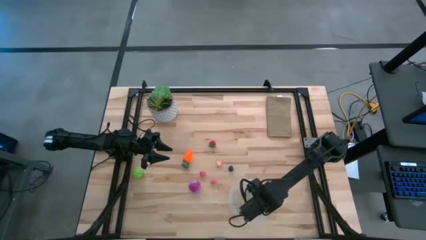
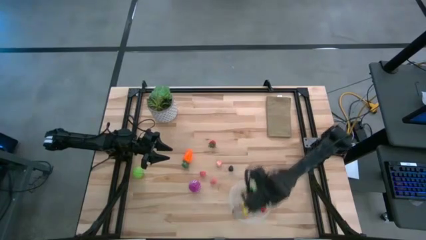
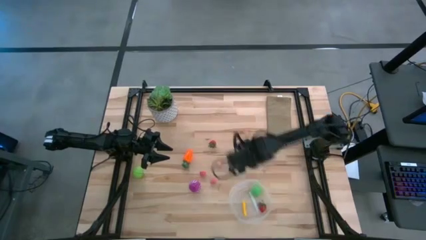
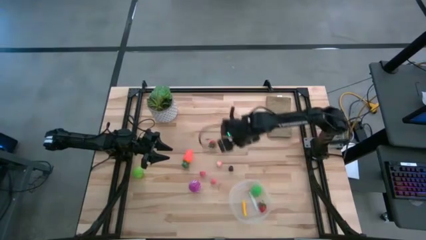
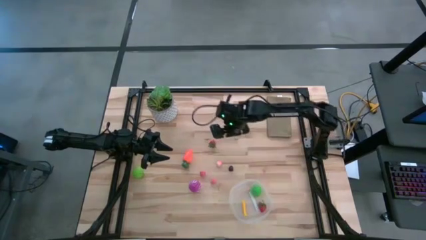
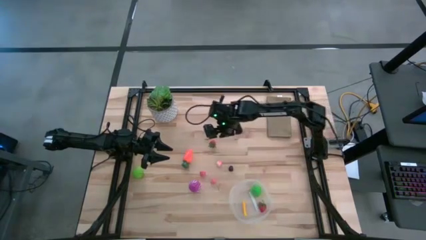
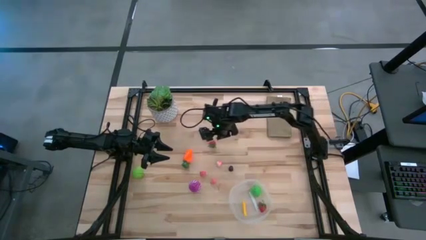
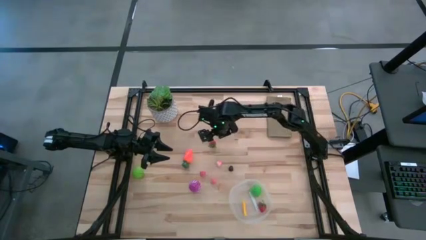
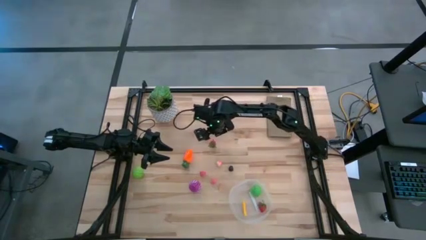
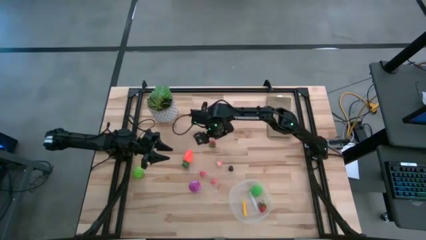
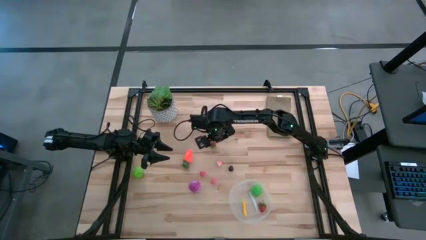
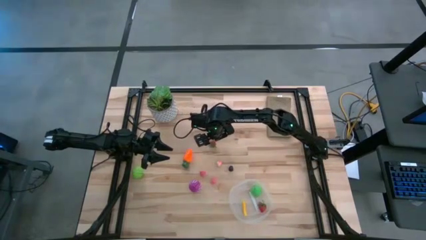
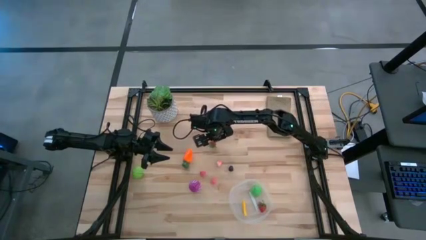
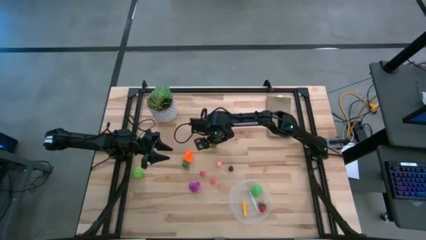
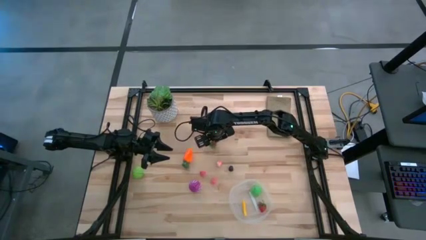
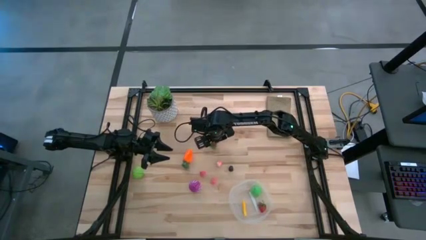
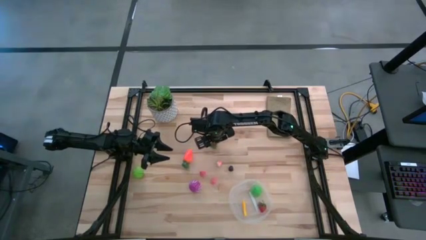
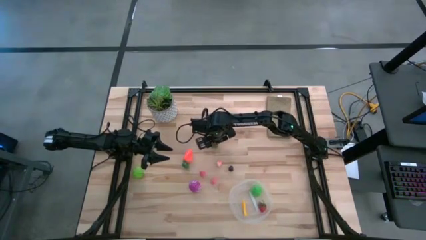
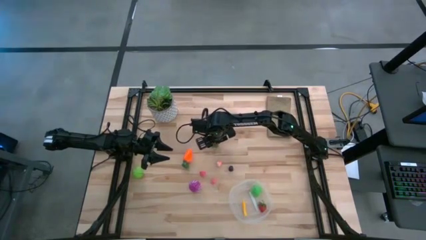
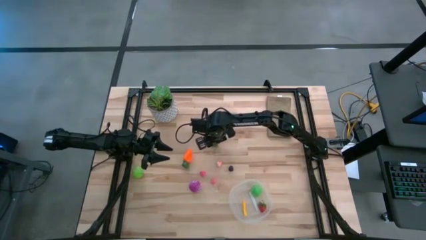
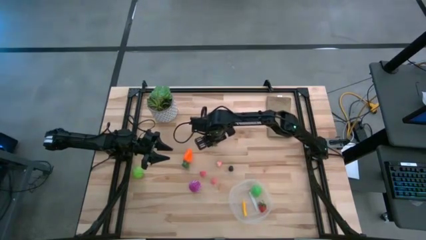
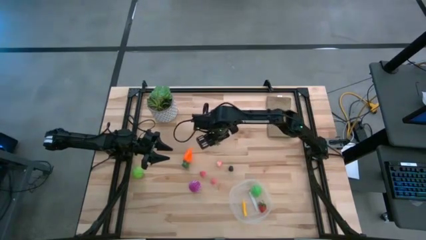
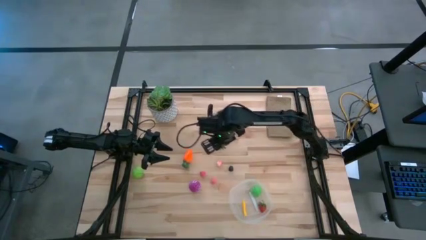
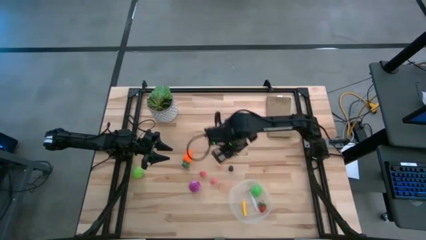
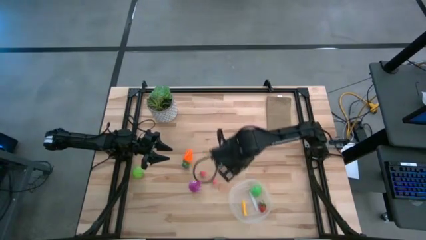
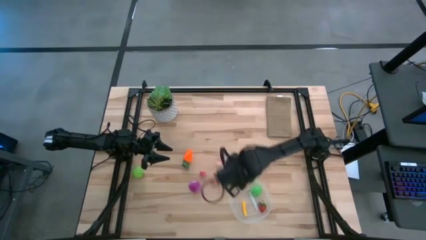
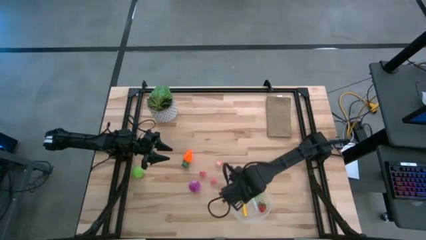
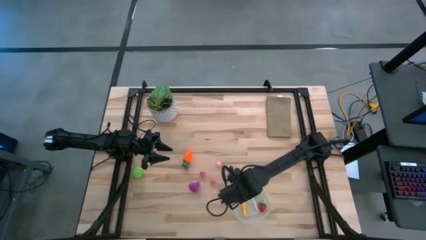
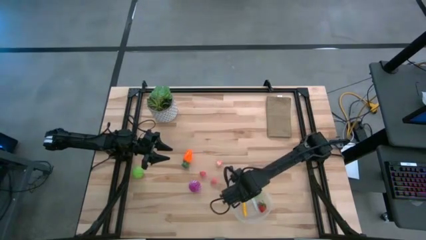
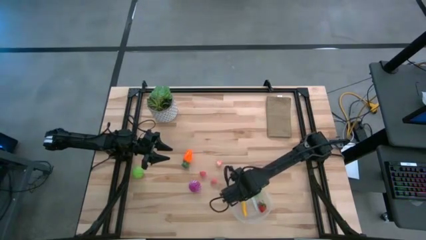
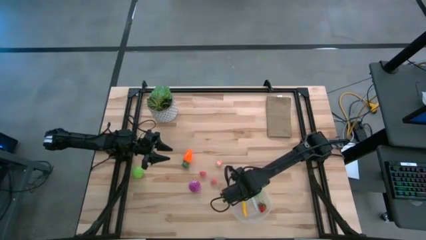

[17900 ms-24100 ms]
Task: Pick and placing Produce into tupperware
Put the strawberry into the transparent bin

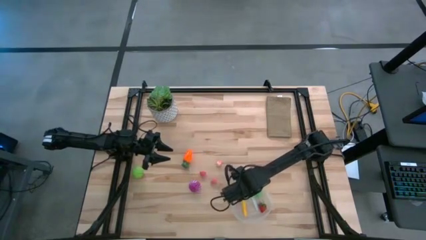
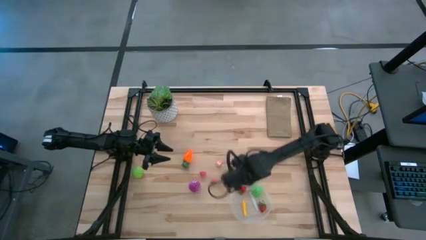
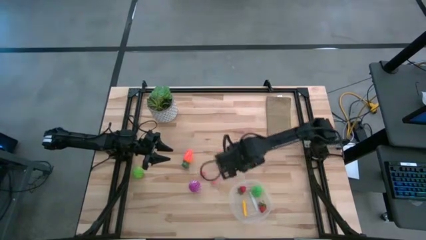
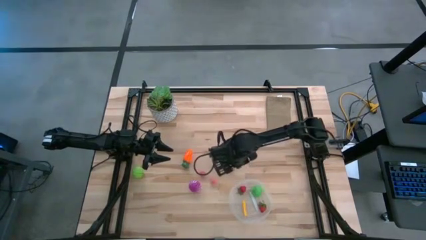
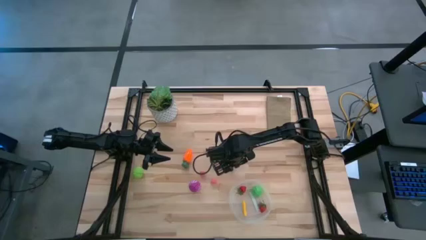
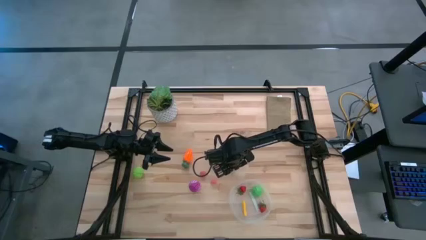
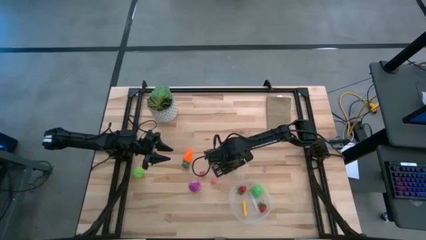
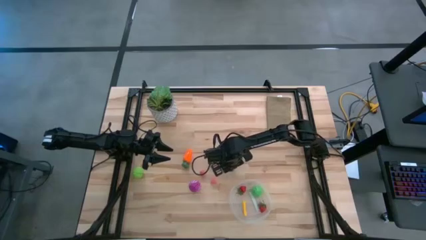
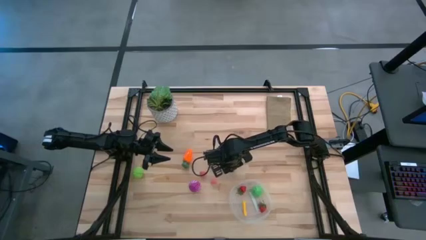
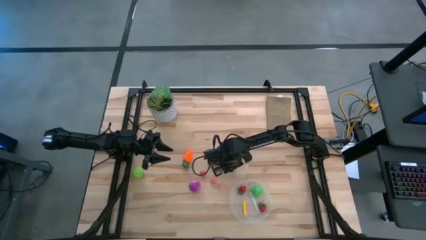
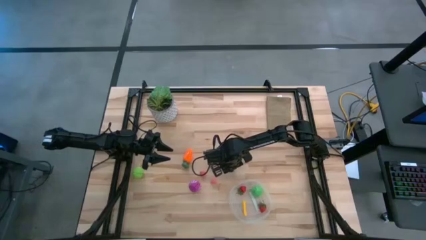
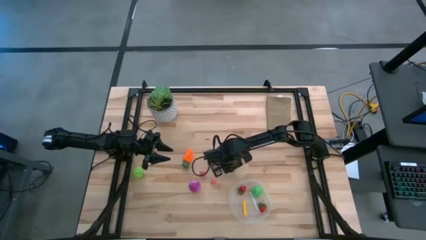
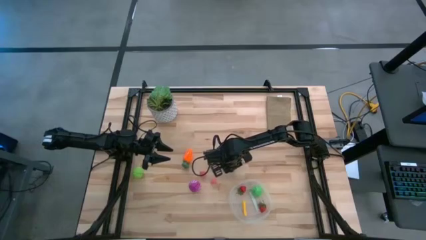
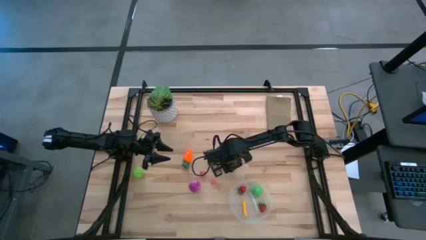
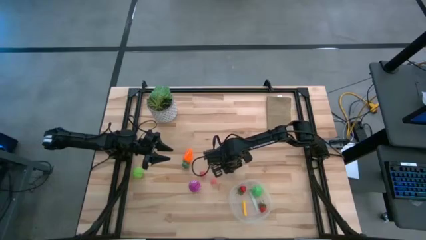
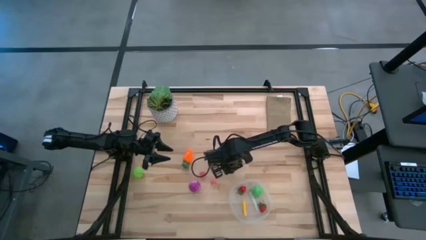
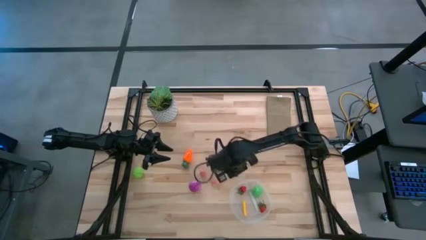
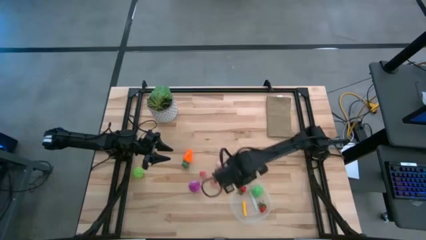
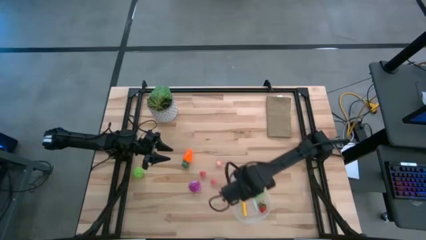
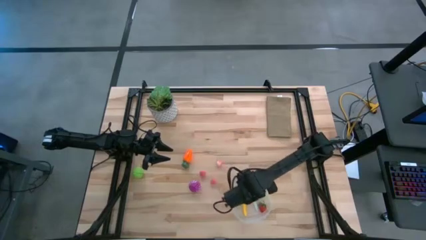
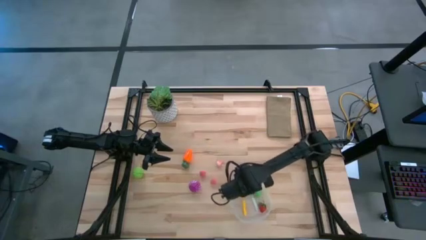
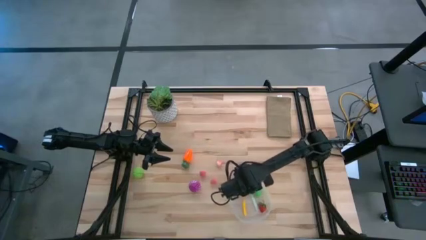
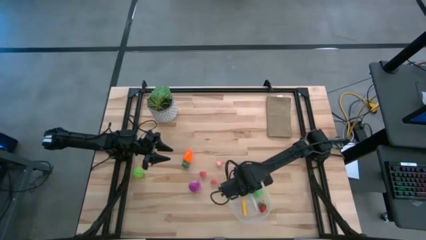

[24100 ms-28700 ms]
Put the blackberry into the transparent bin

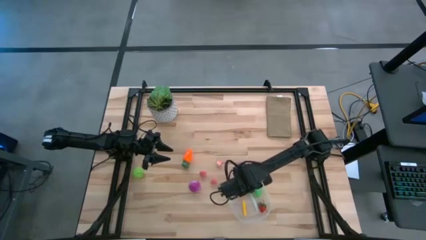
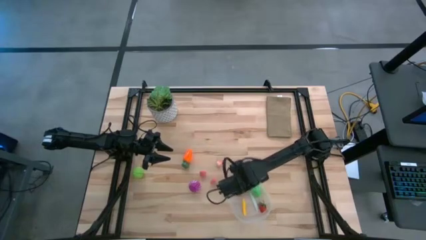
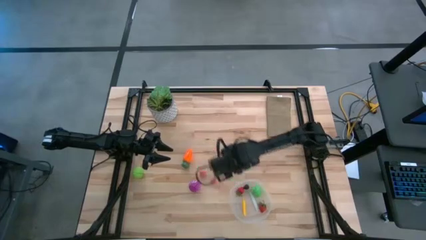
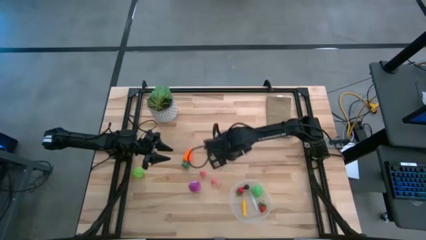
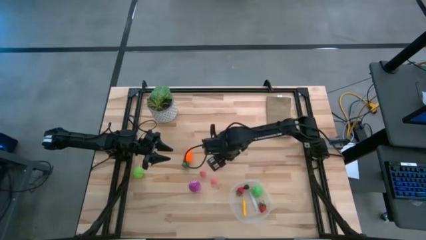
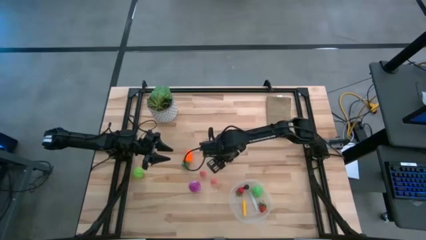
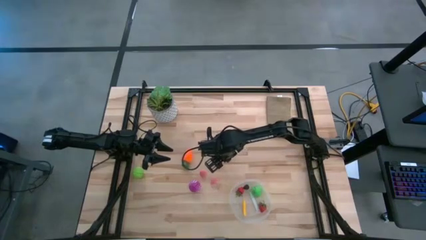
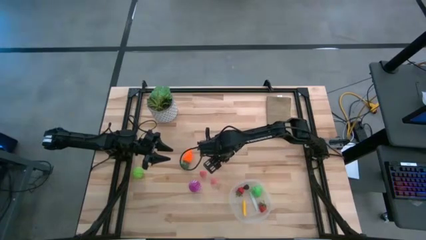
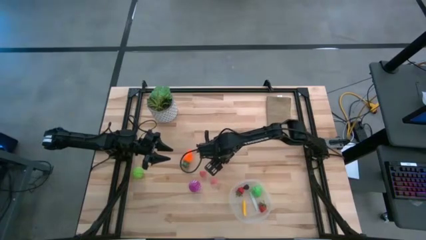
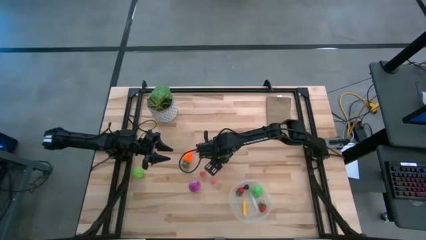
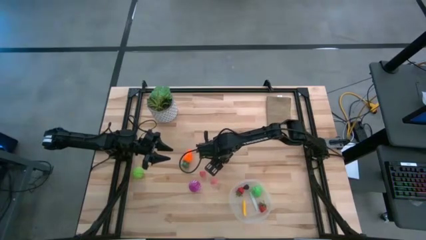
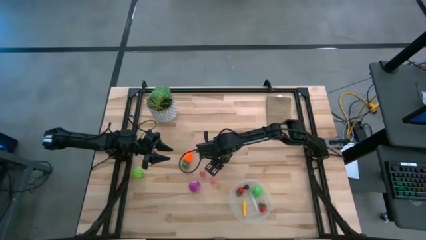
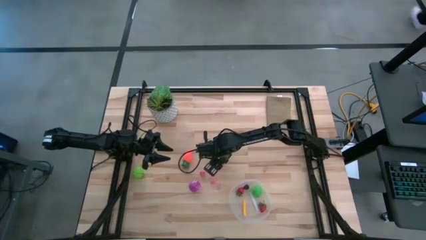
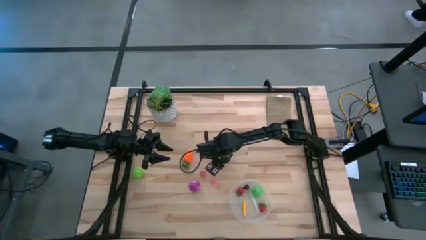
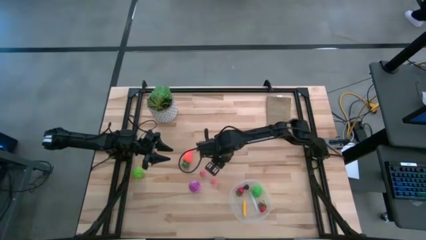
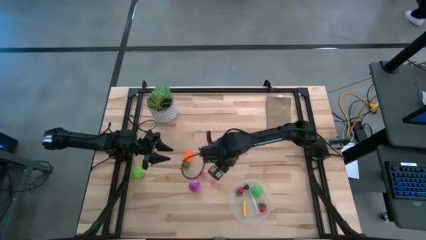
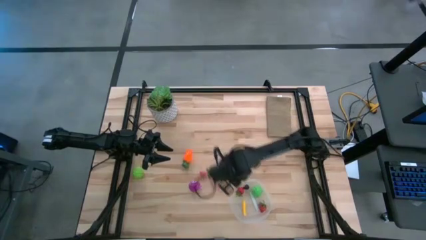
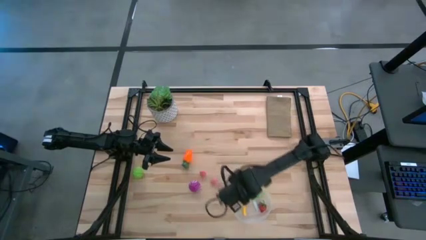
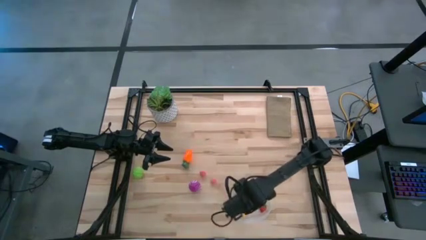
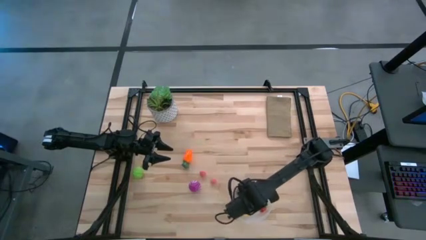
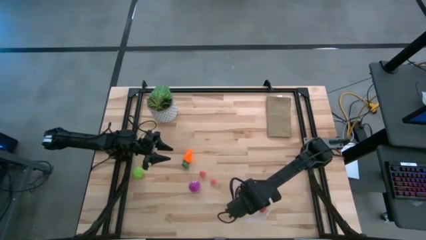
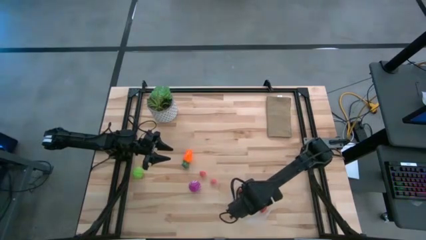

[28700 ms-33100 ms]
Put the top peach into the transparent bin

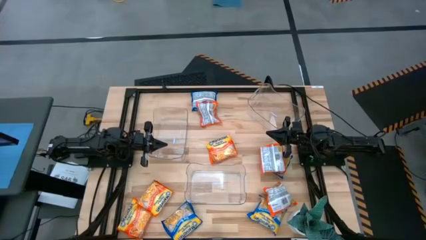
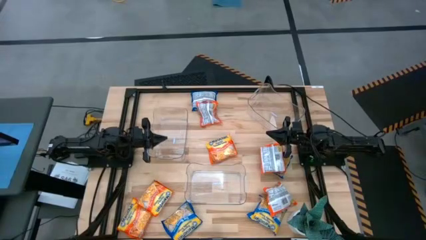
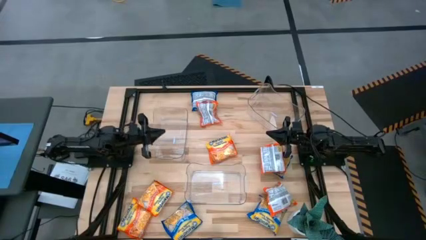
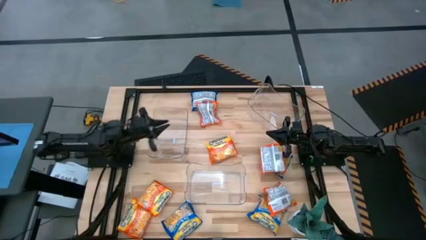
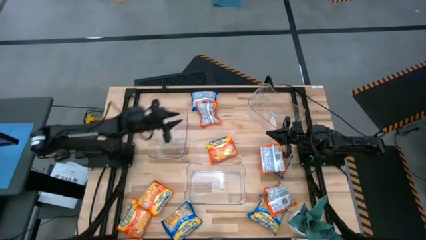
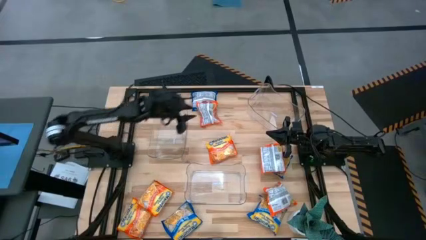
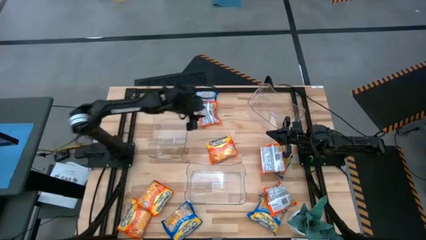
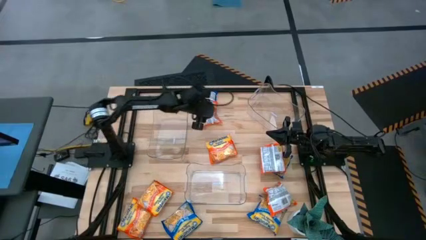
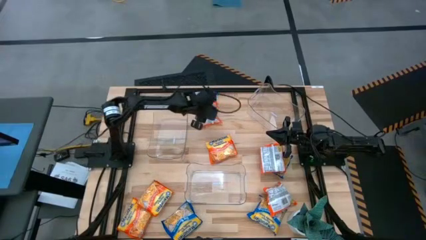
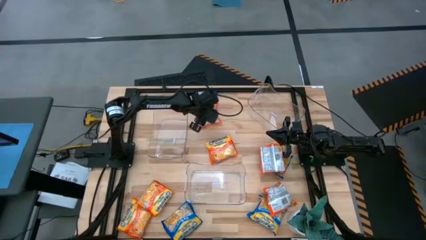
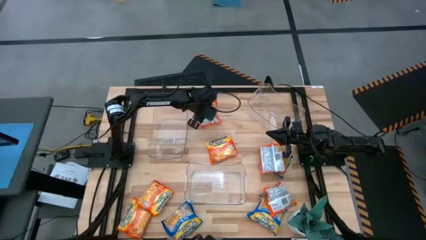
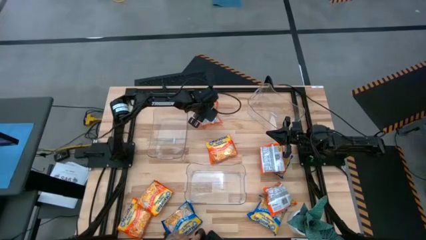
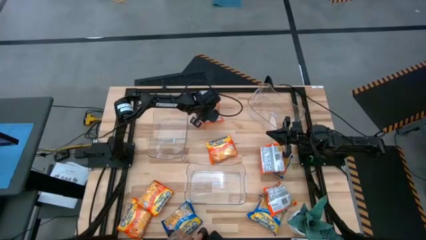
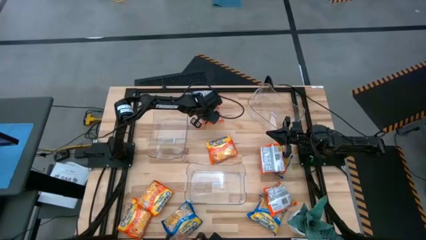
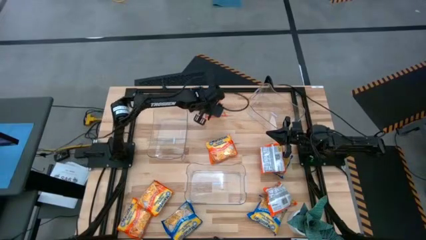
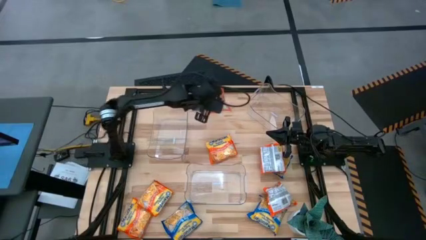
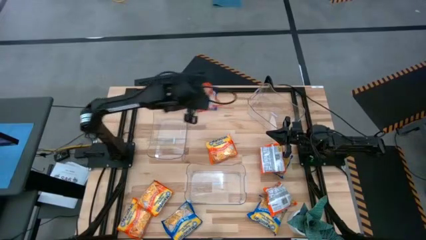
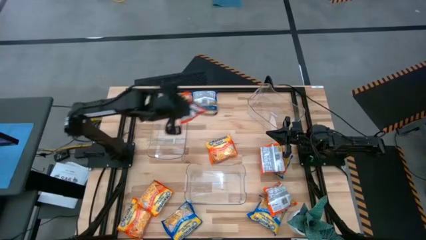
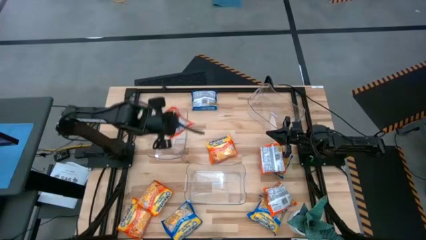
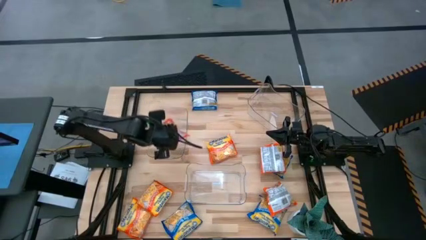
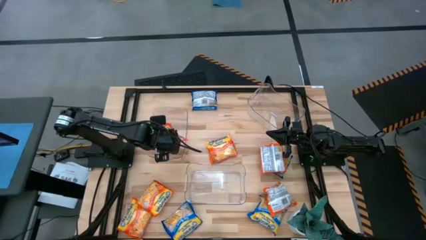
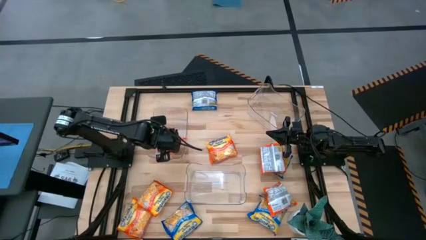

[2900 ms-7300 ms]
Task: Sort Maruchan noodles
Put the orange noodle pack into the middle transparent bin
